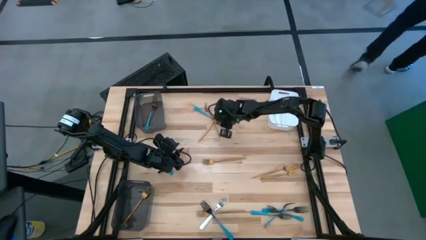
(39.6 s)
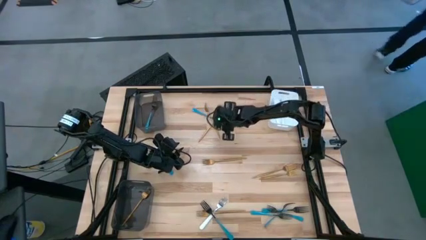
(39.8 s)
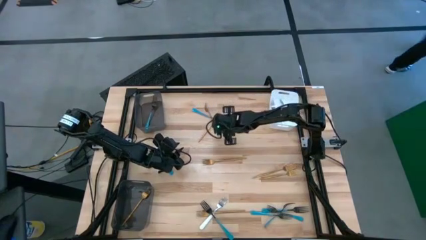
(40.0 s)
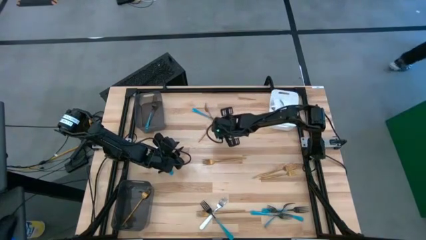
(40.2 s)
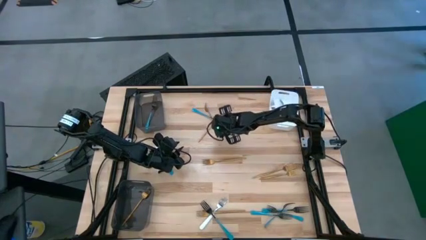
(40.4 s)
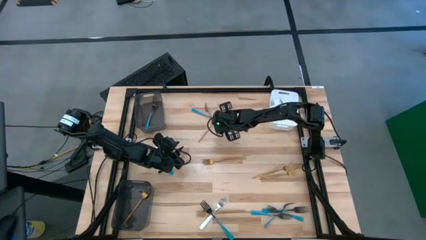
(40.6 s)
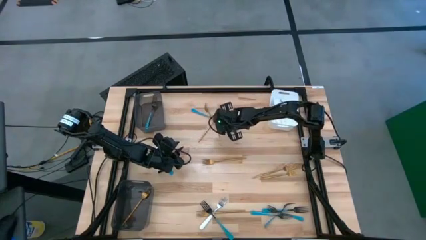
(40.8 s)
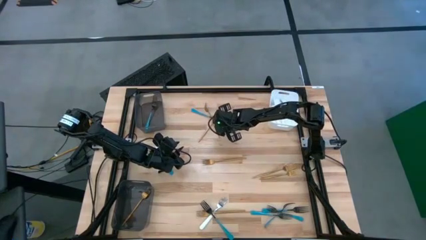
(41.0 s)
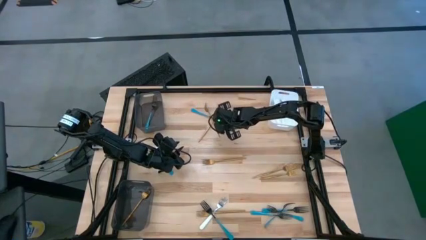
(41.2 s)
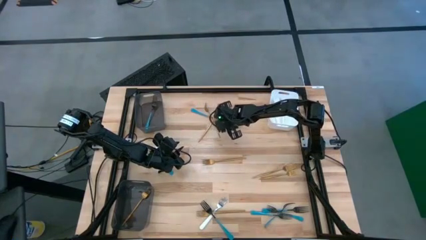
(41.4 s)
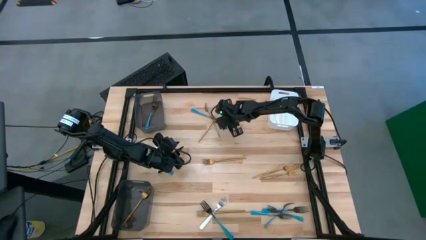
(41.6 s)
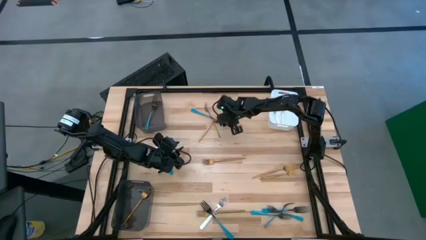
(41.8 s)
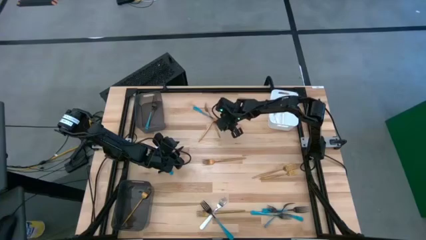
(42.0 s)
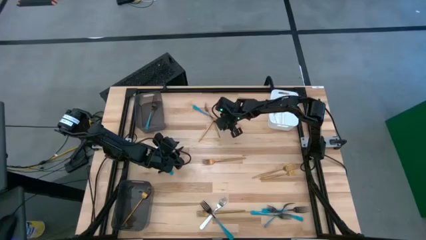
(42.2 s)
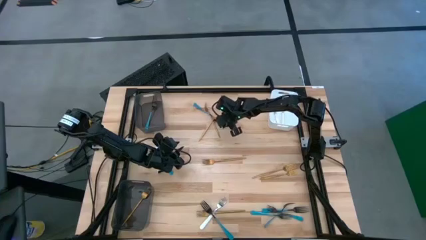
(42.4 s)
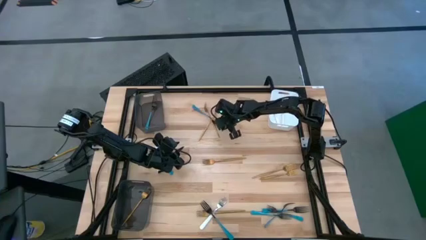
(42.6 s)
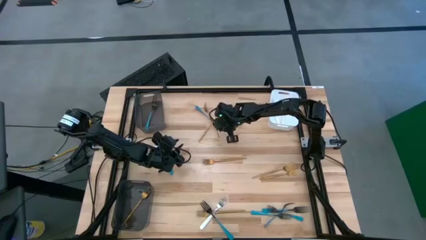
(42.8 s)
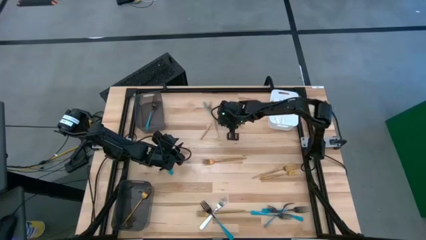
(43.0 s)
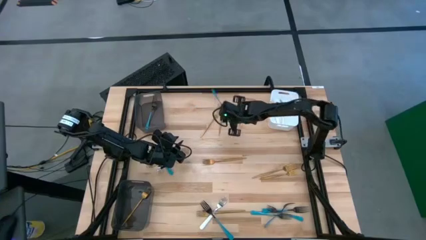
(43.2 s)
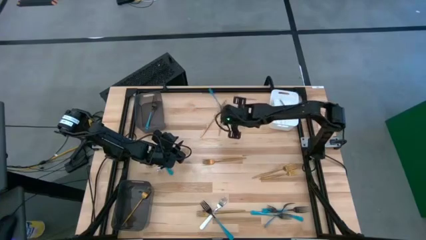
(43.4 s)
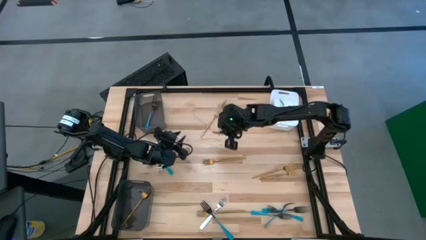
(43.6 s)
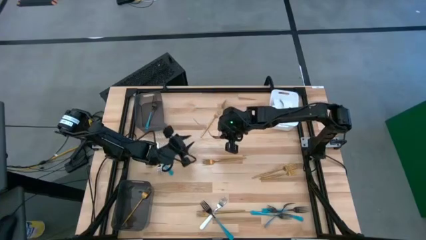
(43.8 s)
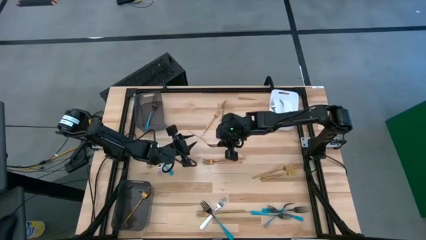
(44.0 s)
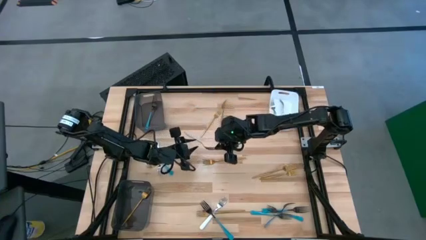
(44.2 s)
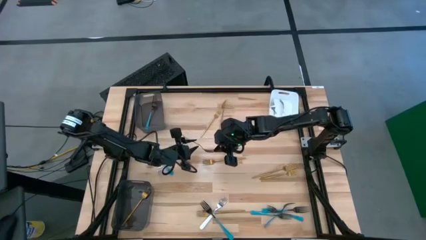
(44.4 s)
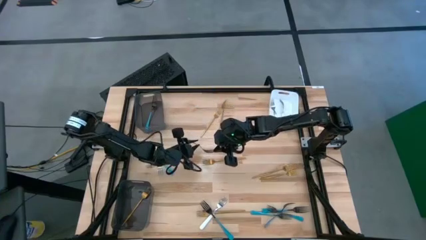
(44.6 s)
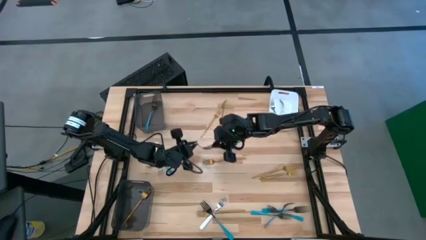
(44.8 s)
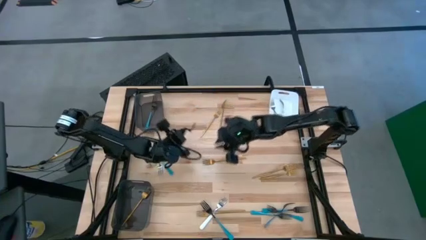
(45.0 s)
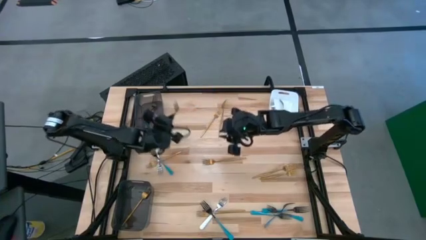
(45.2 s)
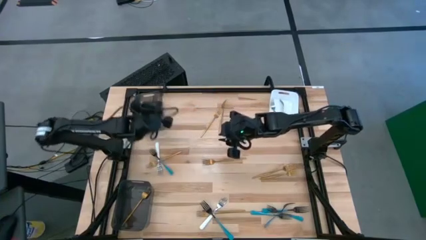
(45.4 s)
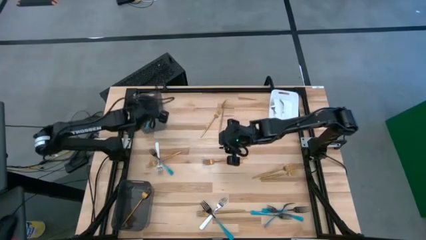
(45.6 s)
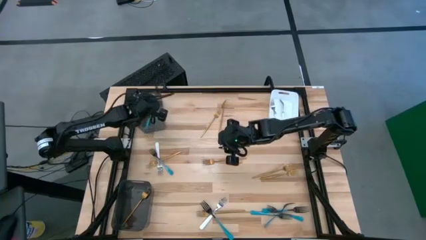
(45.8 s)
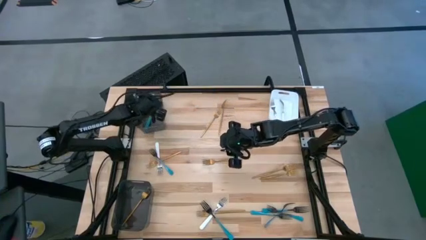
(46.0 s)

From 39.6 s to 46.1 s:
Task: Sort silverware by color (type)
Put the blue fork into the top black bin

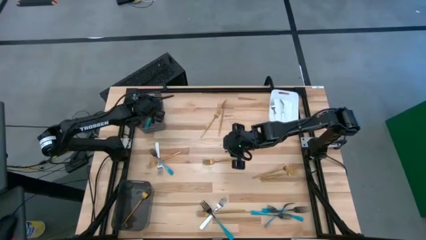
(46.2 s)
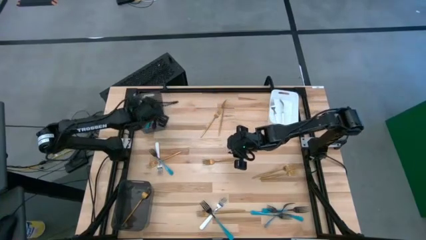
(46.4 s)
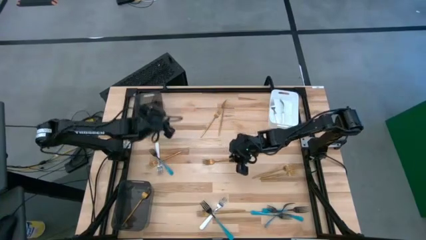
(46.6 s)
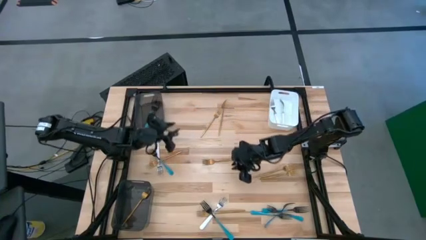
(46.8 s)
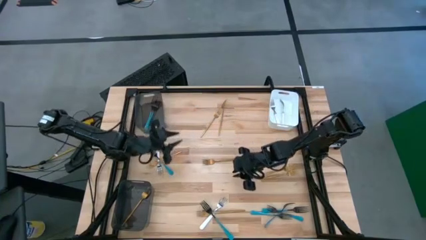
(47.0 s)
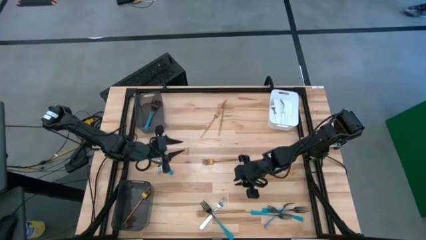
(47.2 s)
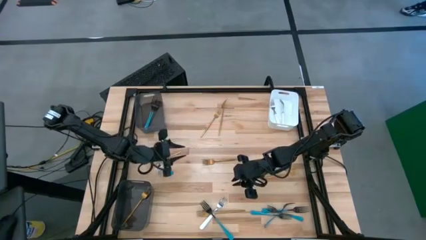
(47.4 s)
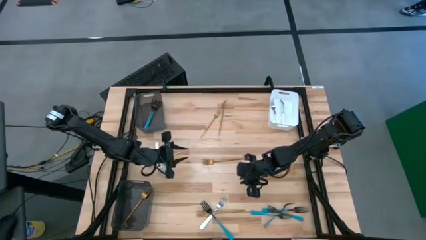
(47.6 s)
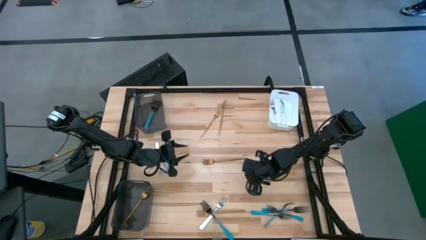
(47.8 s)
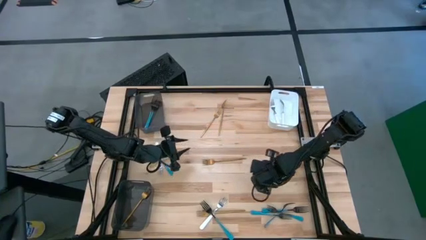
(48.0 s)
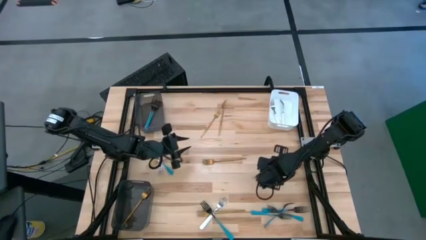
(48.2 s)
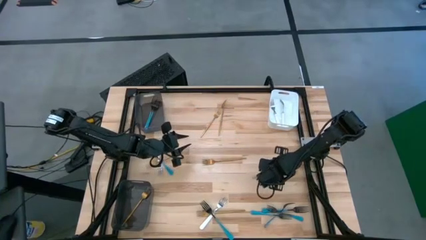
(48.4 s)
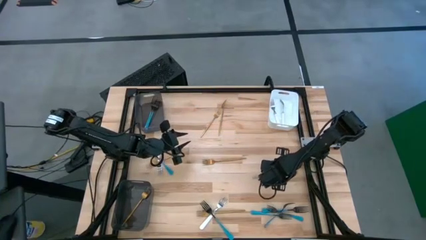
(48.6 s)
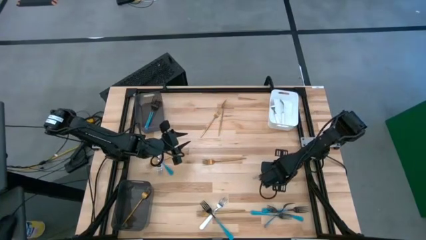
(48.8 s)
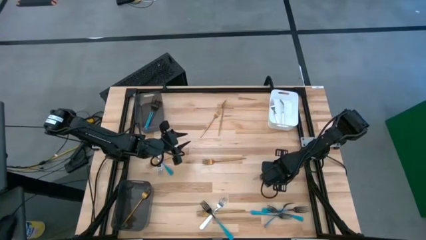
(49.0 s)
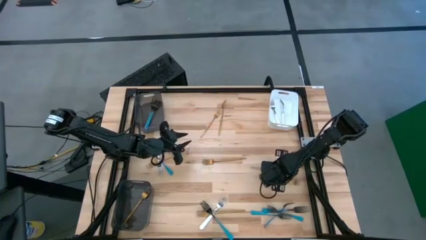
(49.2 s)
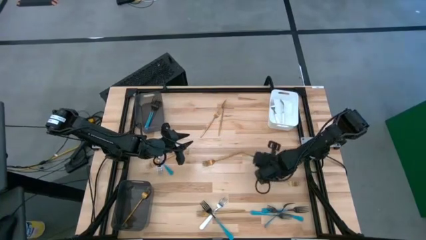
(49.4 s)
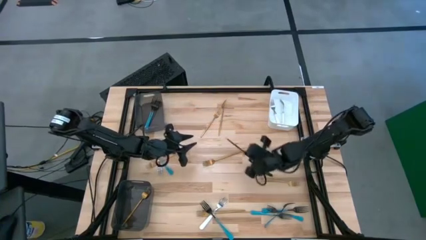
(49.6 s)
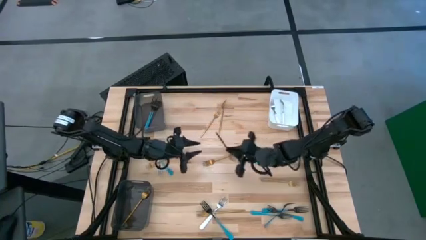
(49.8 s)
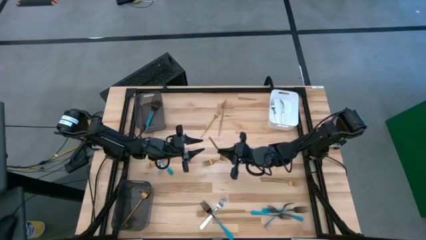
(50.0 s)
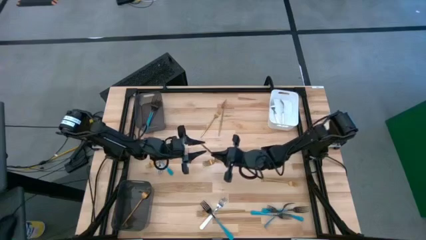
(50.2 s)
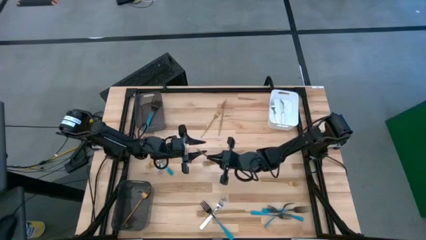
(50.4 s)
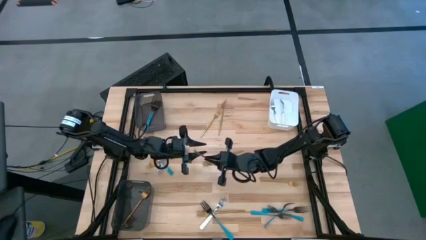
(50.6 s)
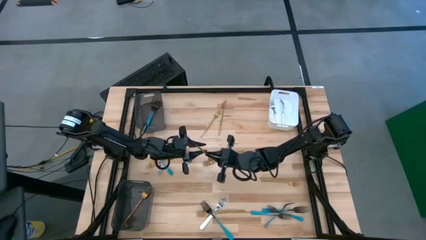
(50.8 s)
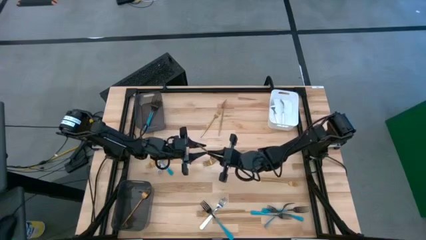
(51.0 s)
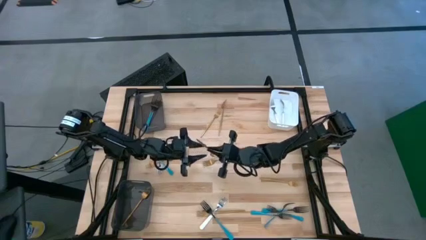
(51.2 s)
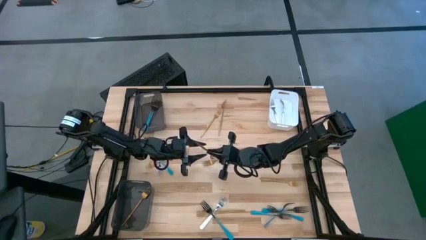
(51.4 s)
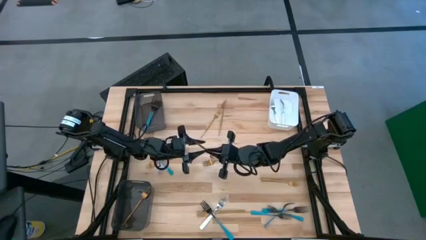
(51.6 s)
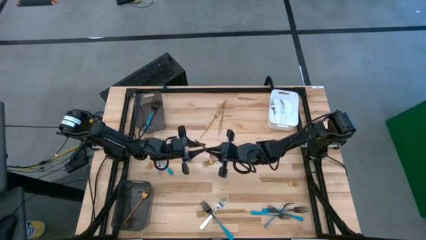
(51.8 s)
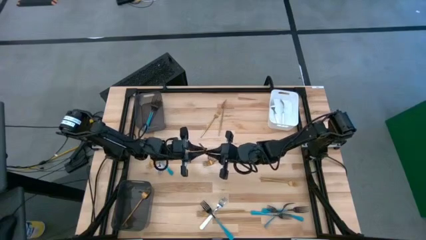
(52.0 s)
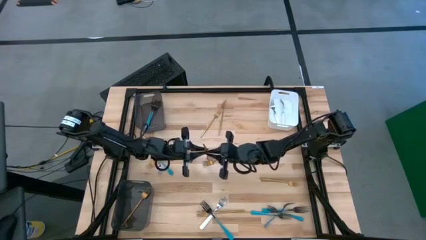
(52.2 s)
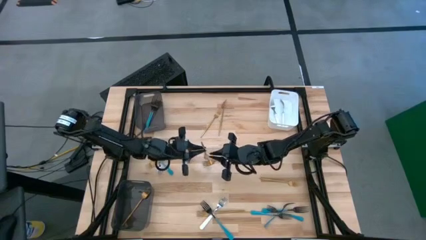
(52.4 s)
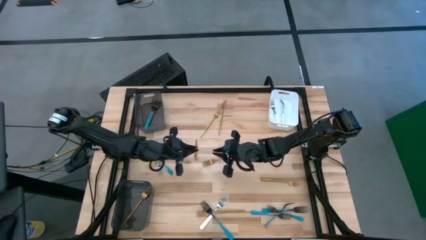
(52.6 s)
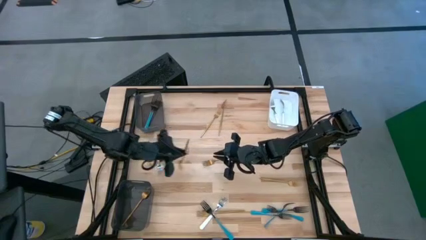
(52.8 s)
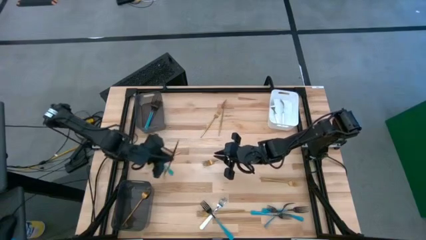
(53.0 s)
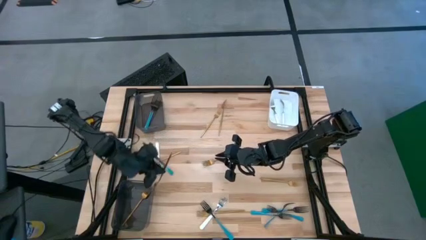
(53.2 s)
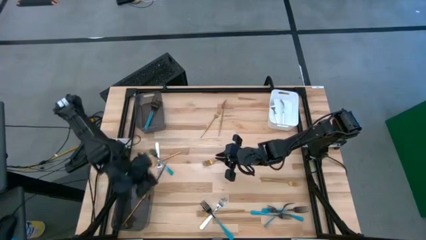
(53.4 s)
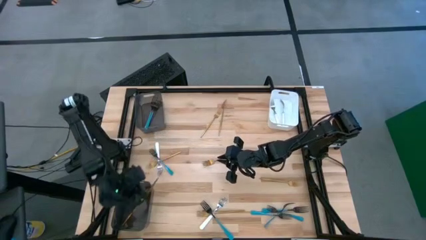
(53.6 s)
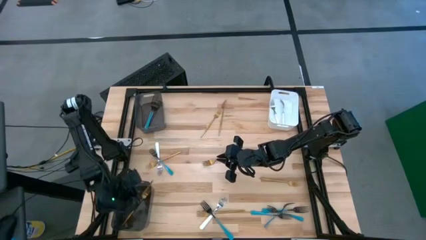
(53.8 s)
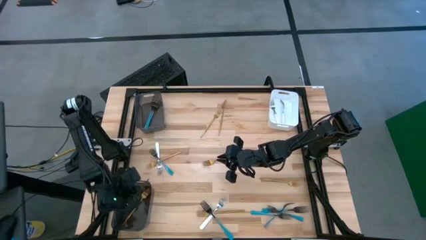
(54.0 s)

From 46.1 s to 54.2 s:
Put the gold fork into the bottom black bin

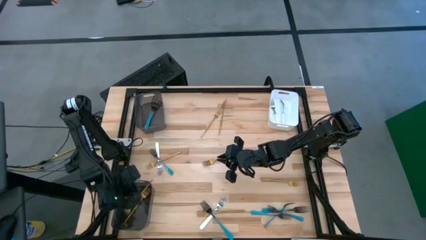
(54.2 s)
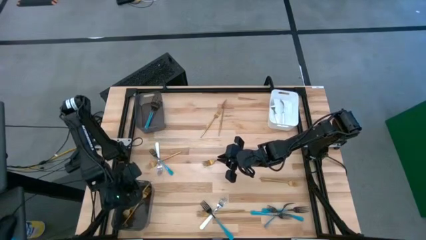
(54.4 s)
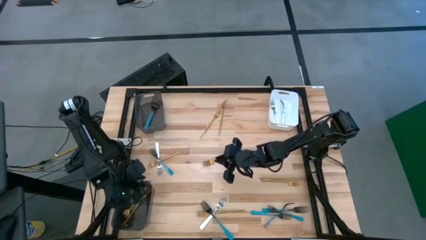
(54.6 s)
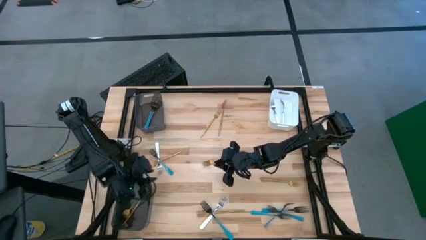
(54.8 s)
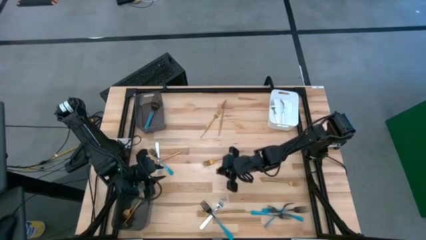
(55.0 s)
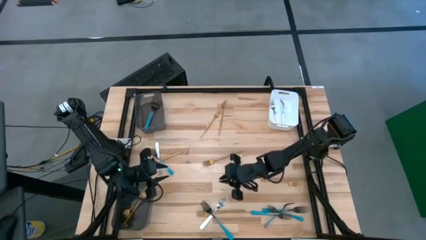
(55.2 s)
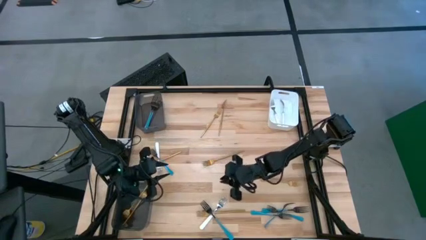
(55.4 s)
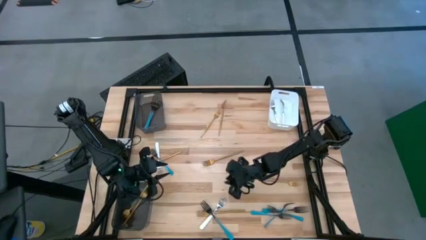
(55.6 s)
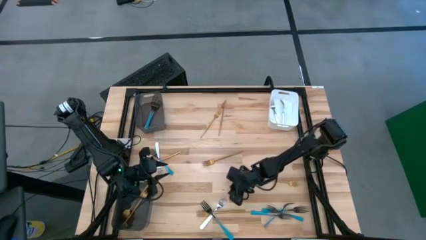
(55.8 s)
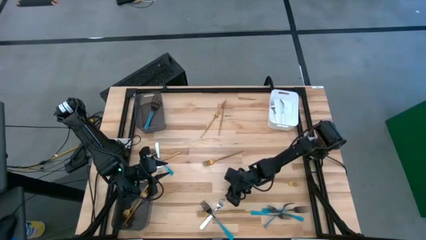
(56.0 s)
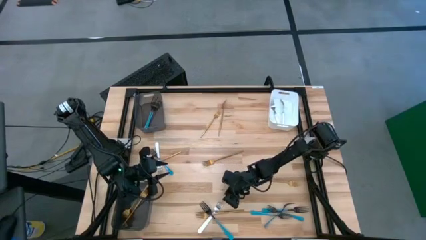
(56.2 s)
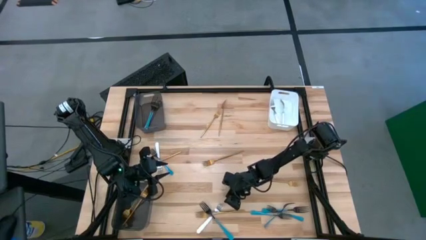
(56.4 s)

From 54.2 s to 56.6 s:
Put the white fork into the white bin
